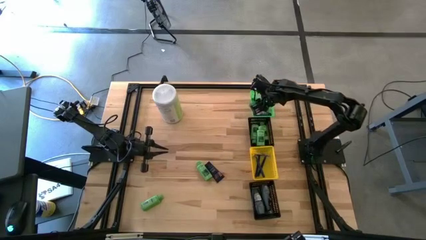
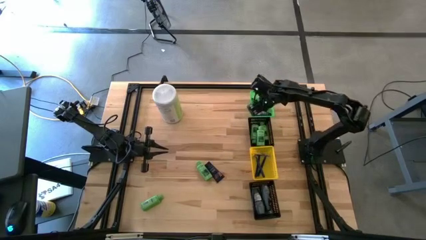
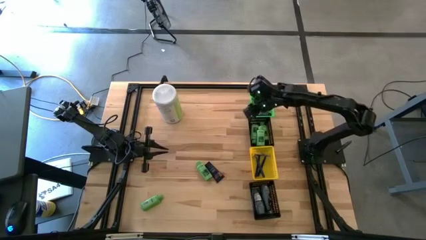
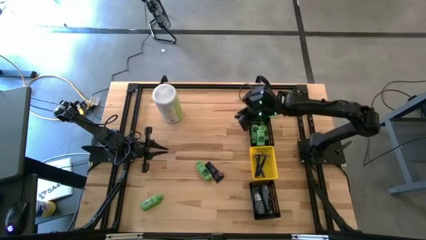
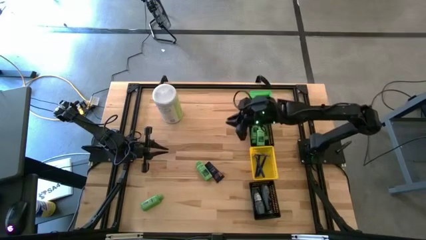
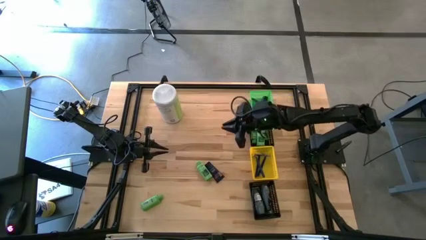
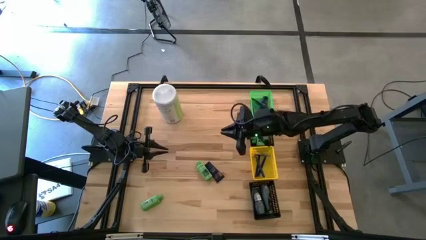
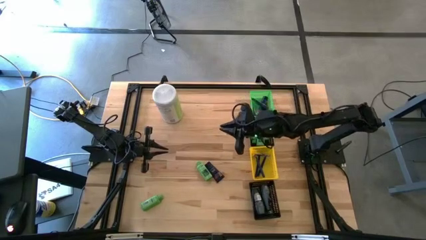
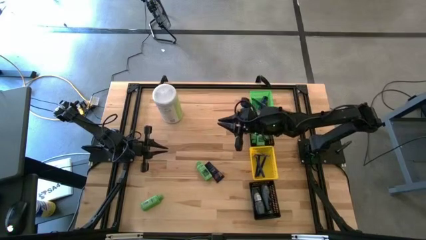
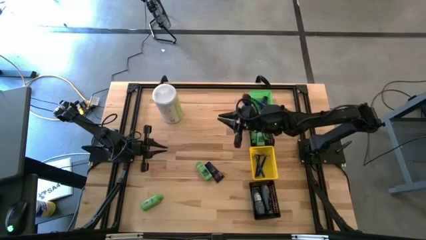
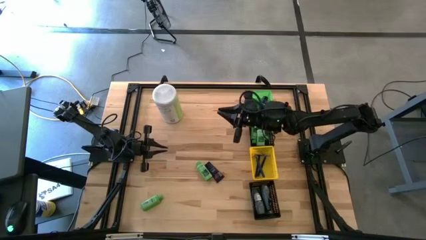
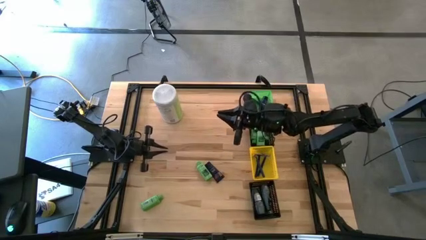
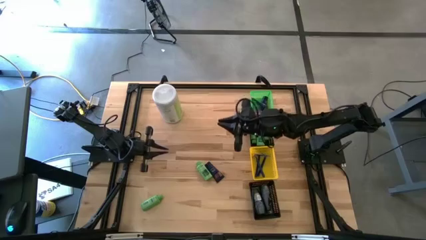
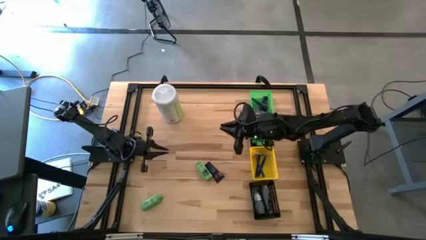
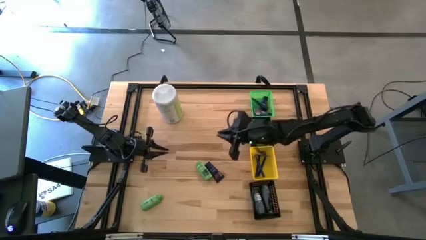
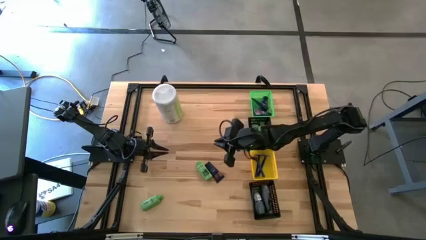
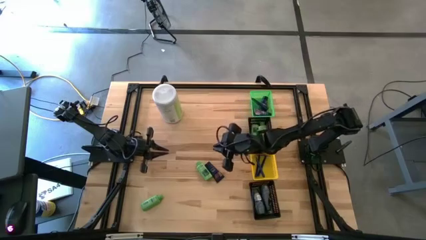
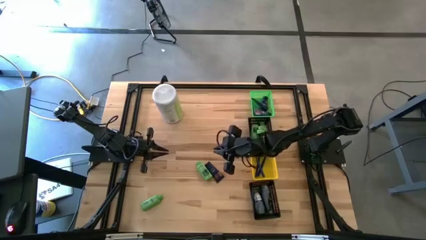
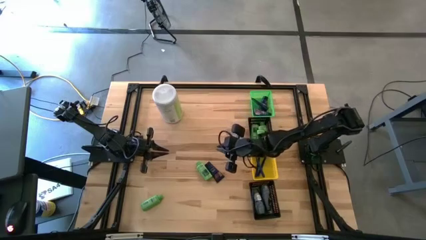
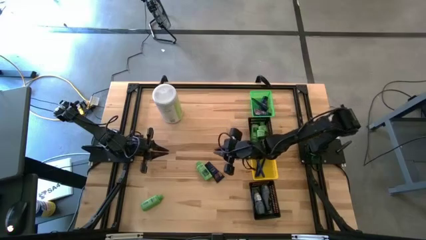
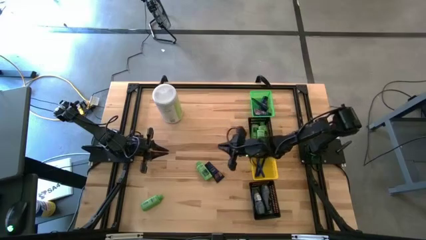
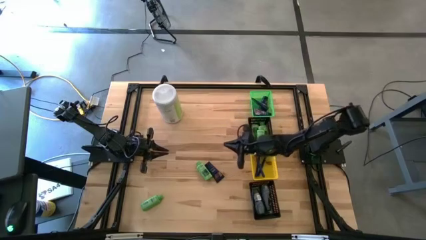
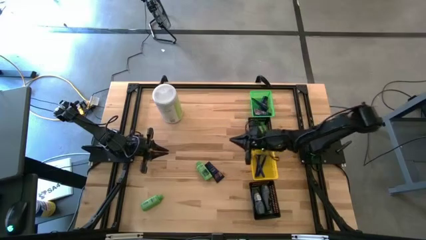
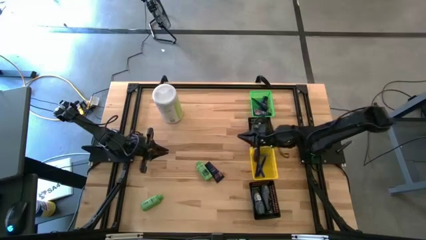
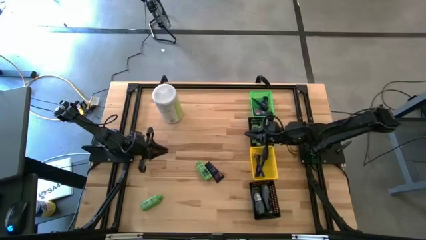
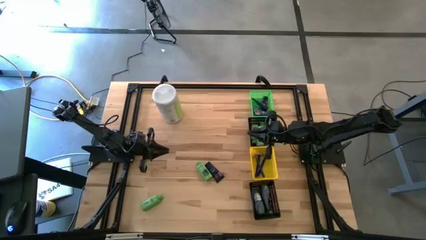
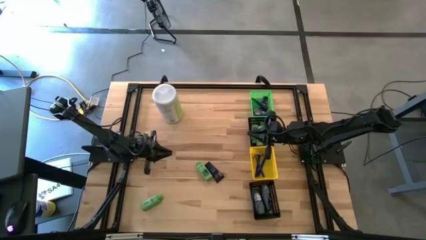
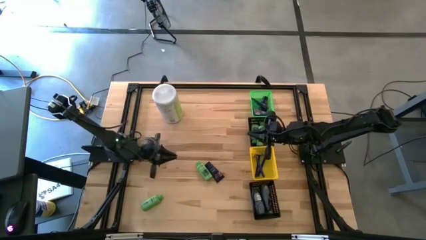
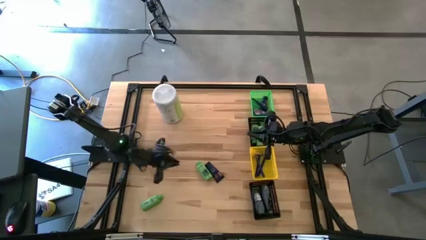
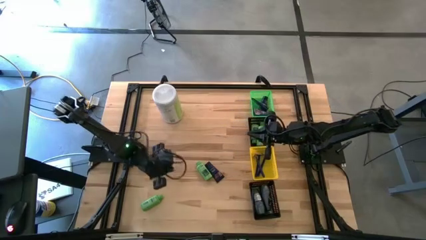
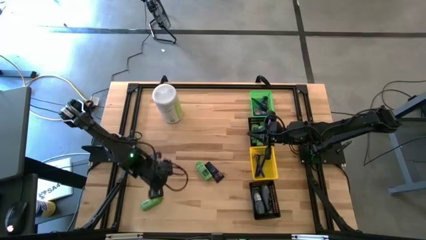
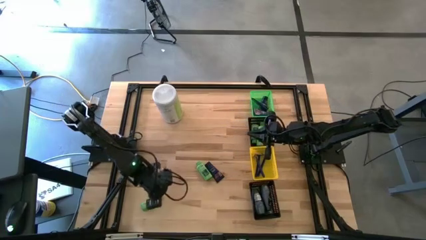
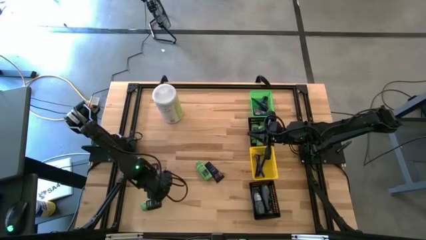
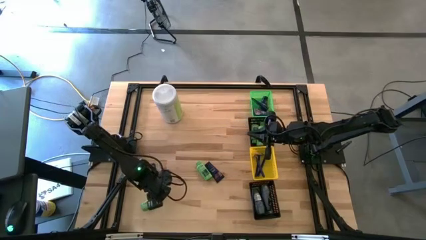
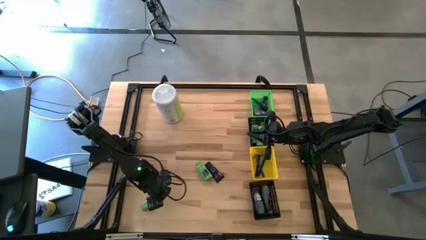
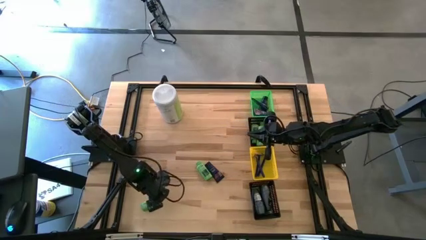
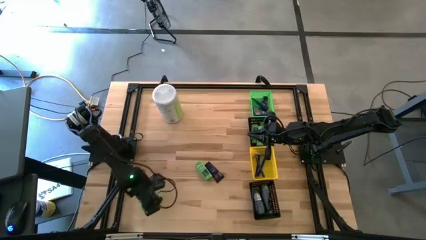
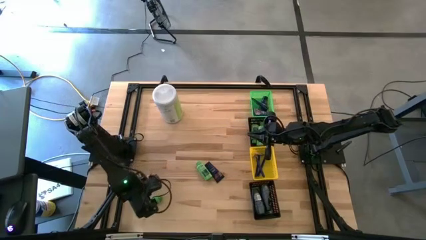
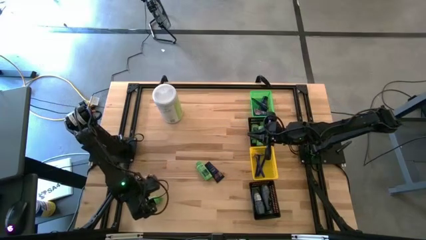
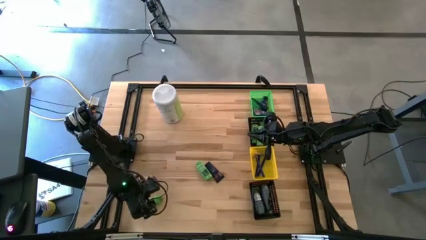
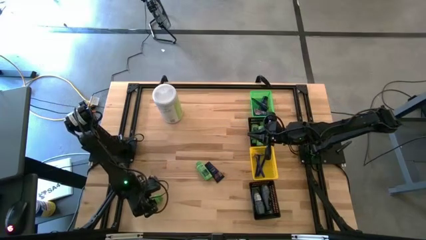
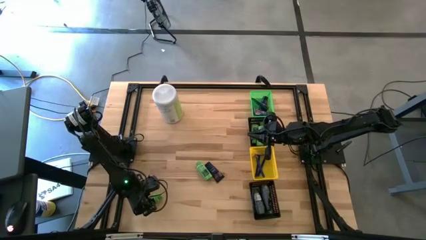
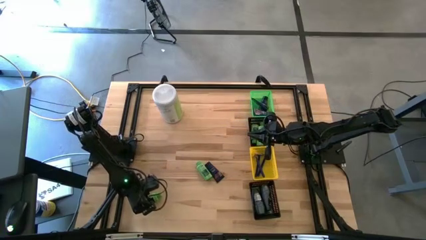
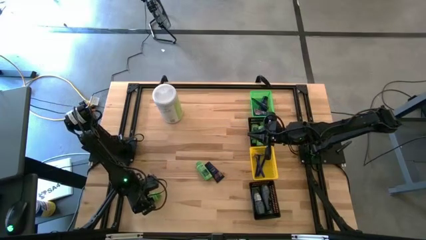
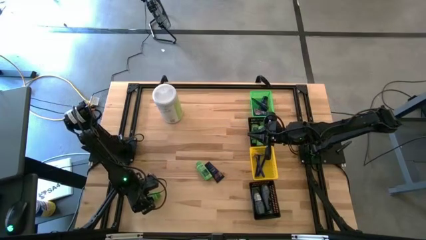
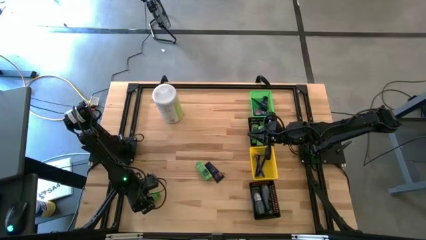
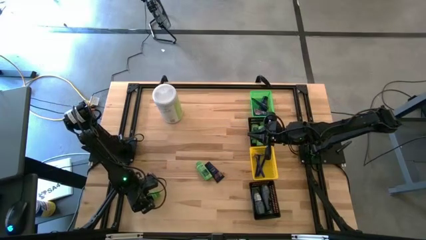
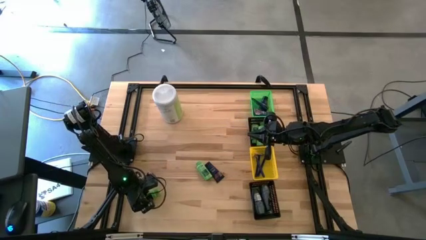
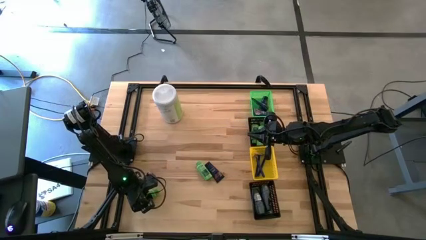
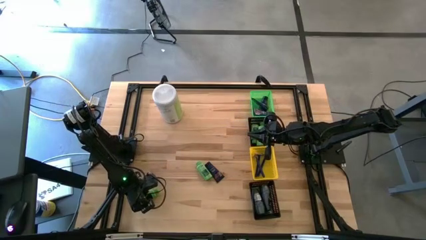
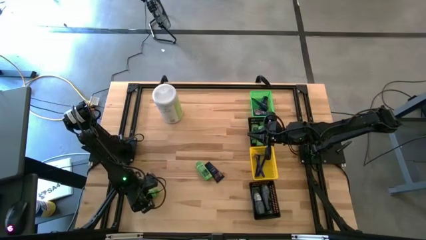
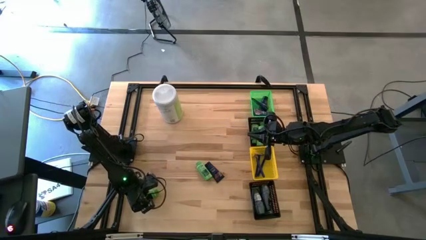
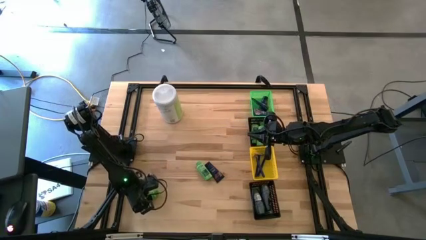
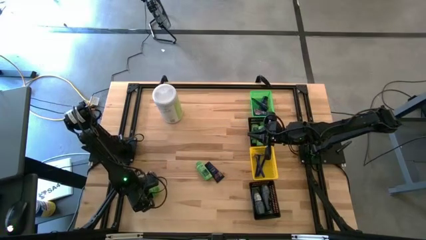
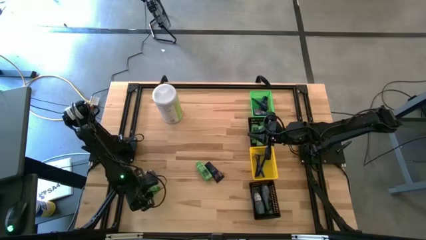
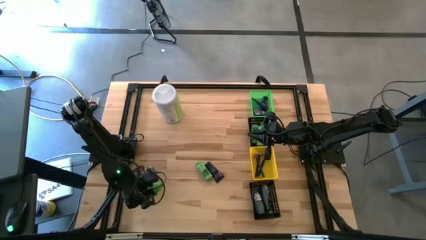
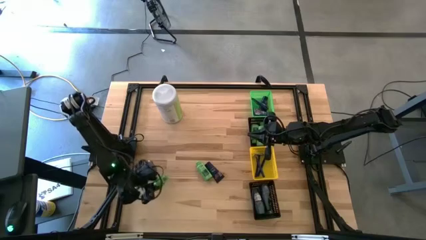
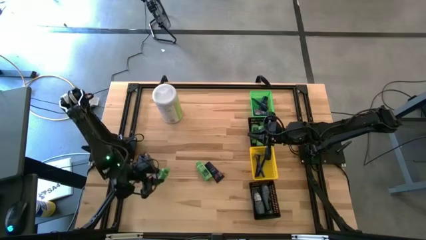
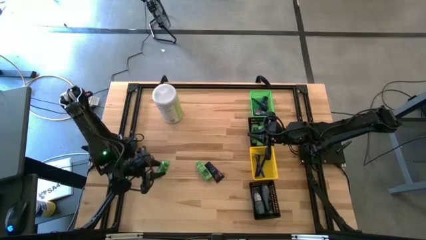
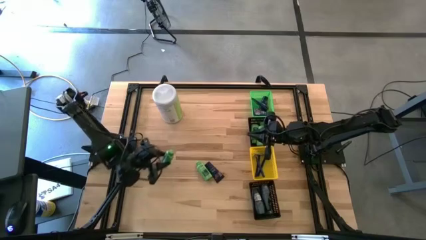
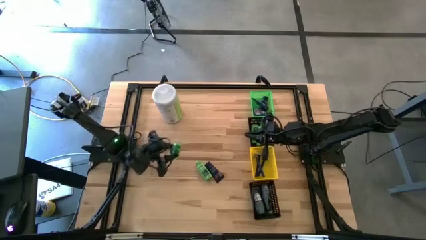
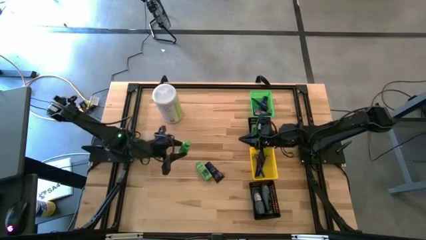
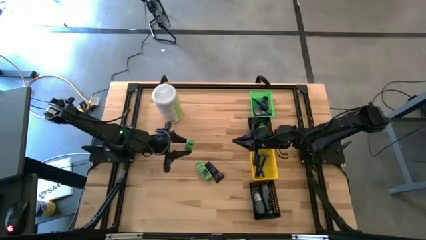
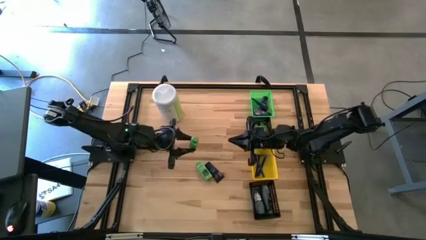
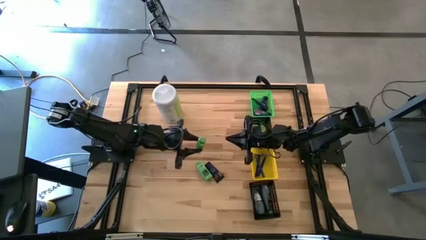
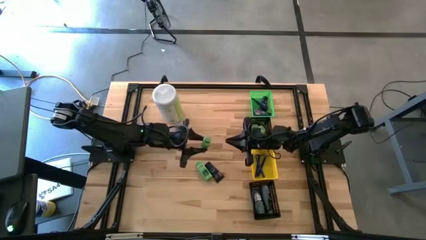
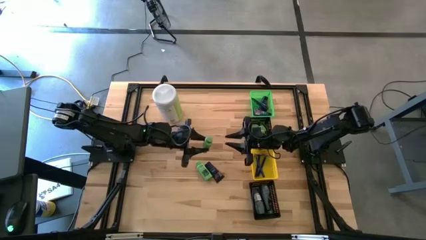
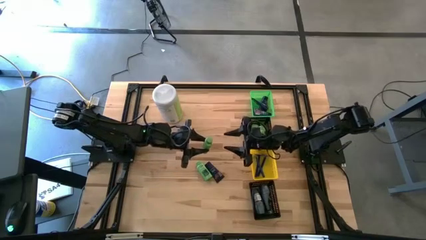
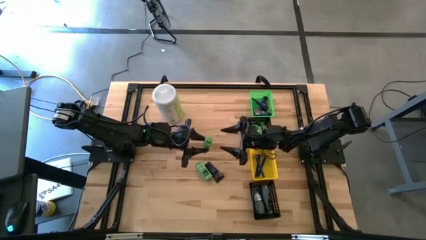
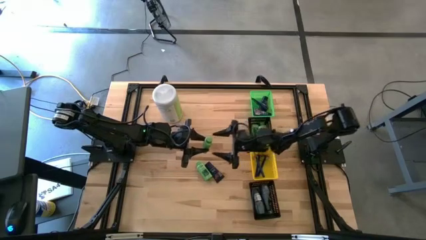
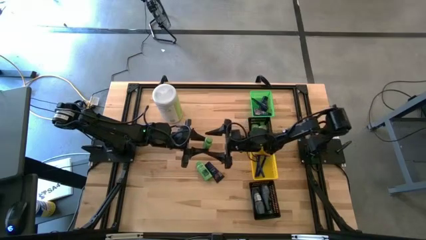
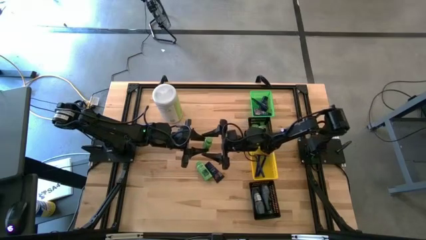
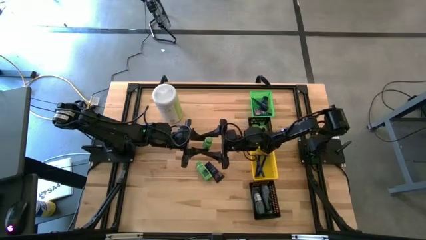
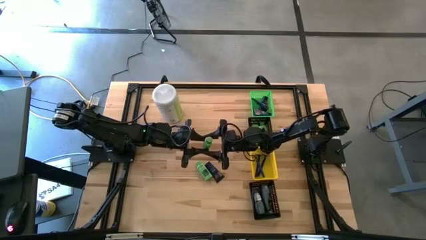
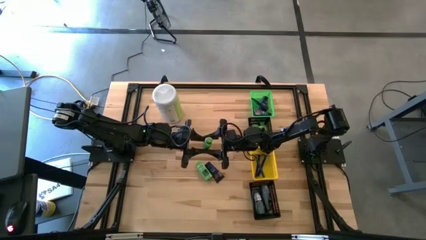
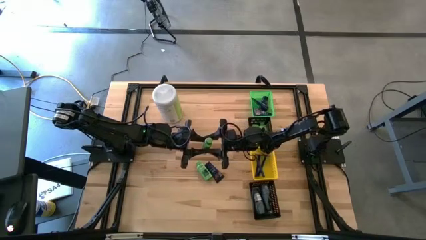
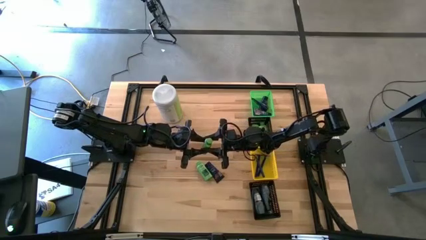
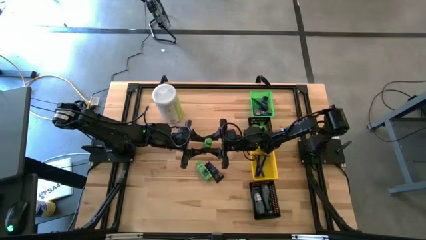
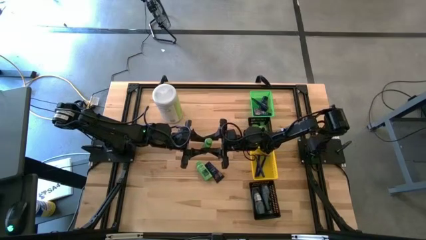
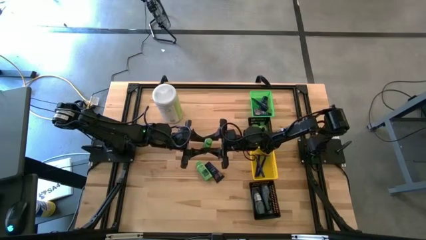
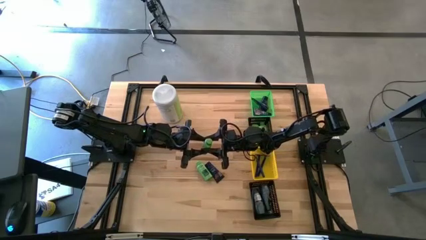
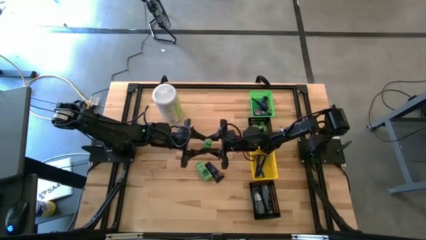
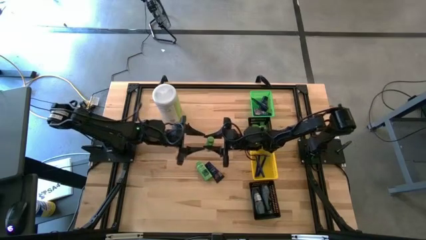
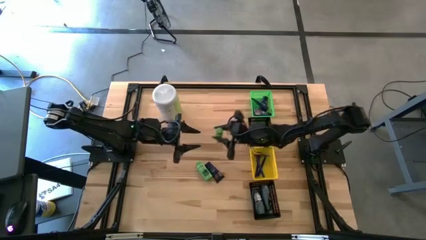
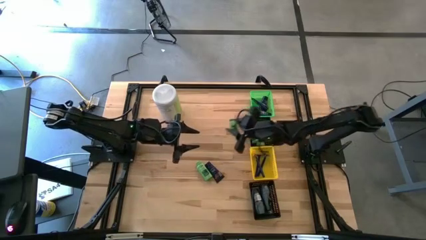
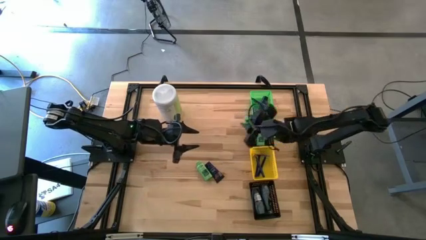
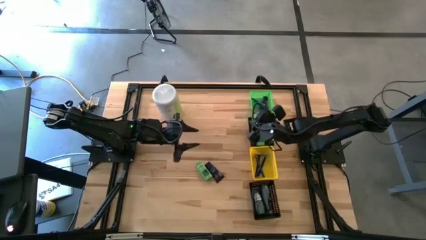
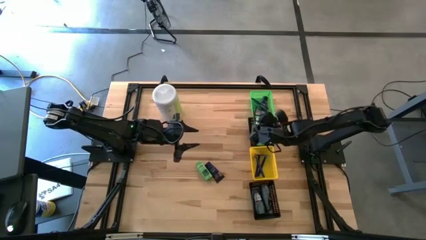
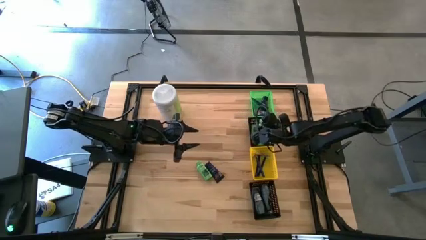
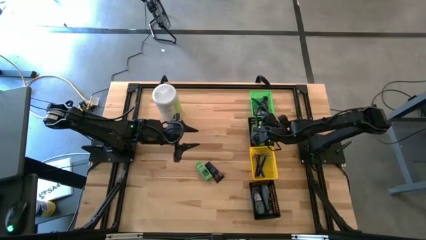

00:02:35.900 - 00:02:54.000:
Task: Pick & Place Travel size toiletries
Put the green shampoo into the top black basket
